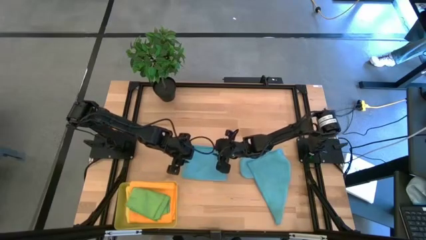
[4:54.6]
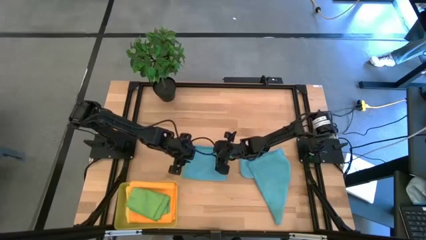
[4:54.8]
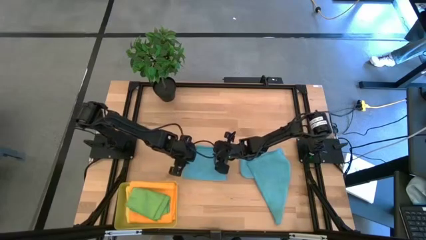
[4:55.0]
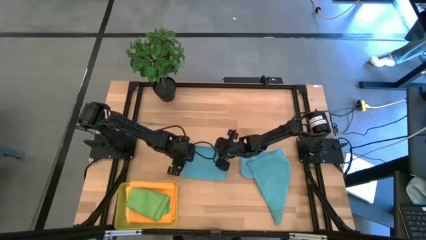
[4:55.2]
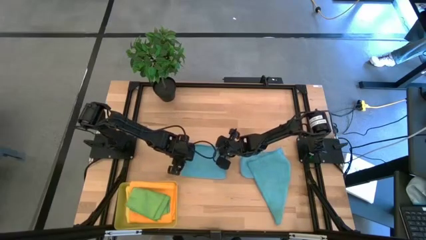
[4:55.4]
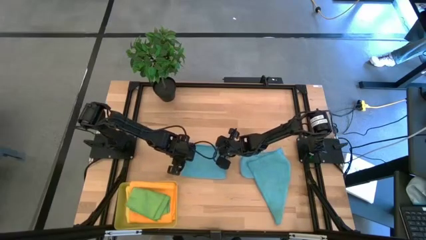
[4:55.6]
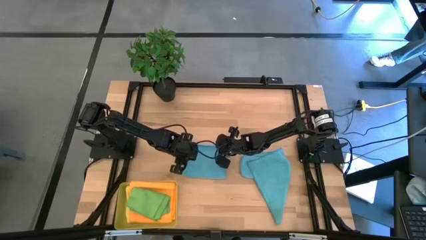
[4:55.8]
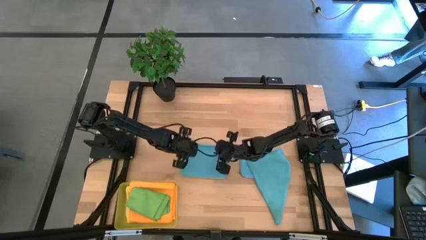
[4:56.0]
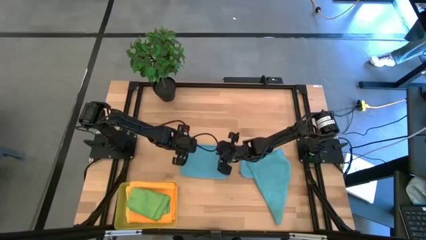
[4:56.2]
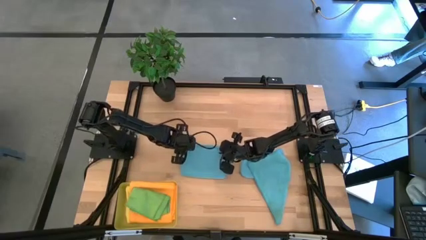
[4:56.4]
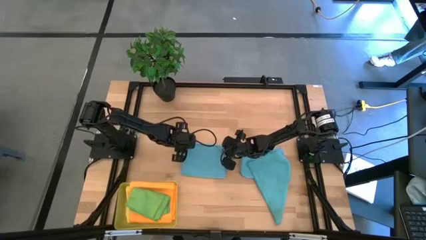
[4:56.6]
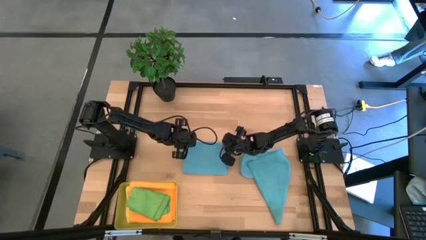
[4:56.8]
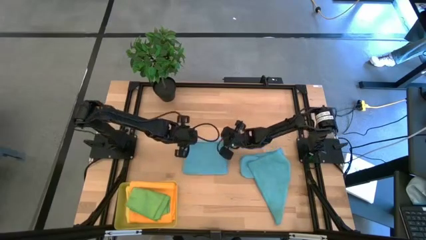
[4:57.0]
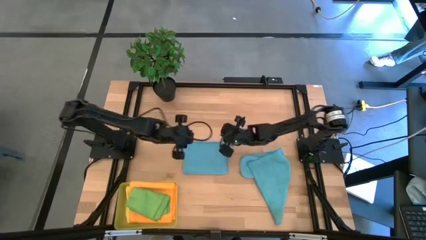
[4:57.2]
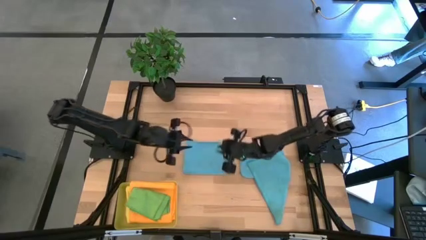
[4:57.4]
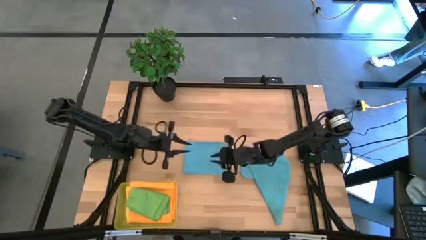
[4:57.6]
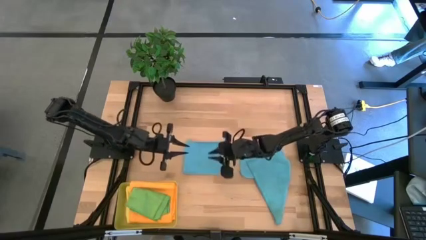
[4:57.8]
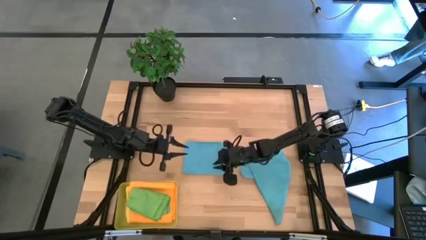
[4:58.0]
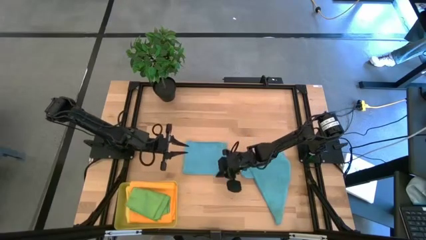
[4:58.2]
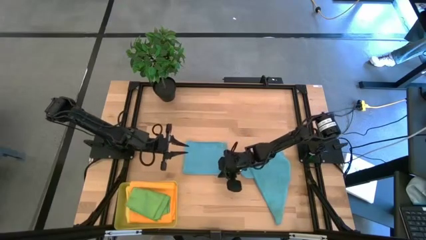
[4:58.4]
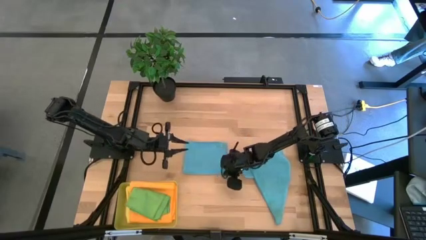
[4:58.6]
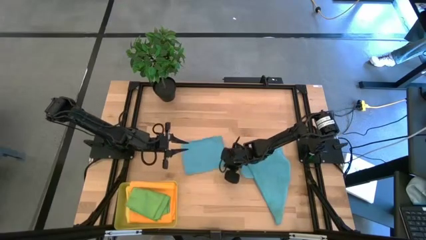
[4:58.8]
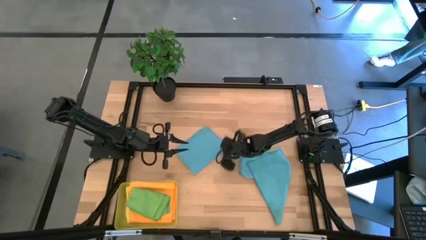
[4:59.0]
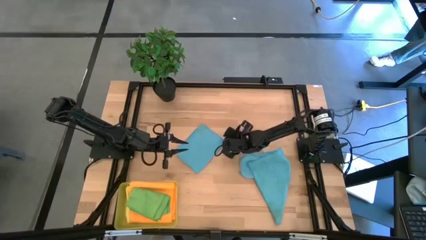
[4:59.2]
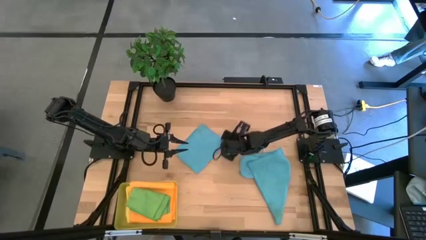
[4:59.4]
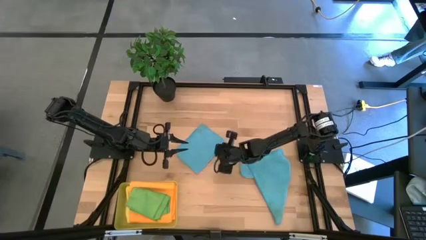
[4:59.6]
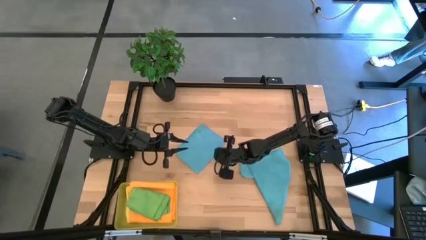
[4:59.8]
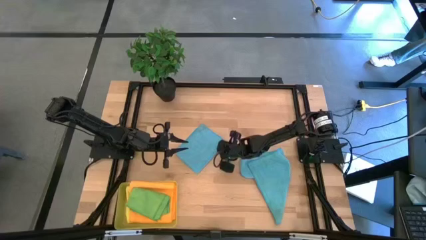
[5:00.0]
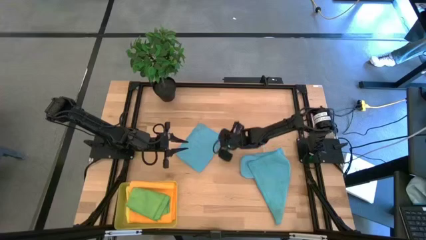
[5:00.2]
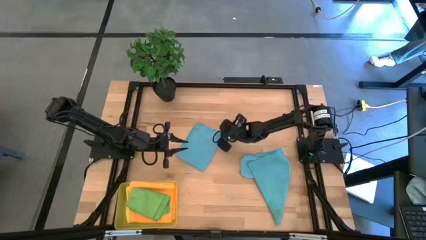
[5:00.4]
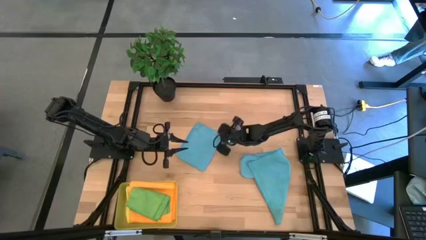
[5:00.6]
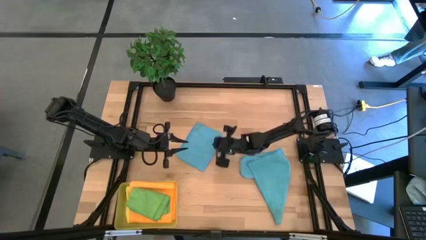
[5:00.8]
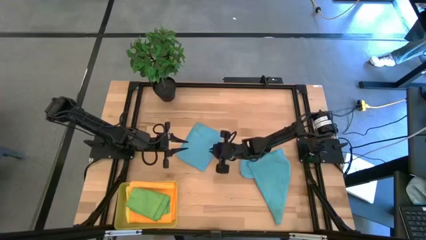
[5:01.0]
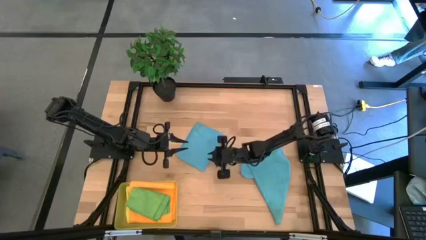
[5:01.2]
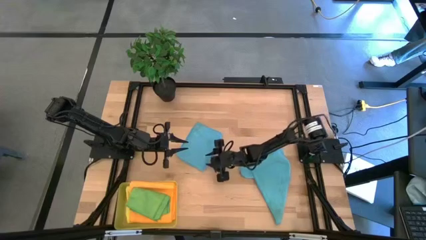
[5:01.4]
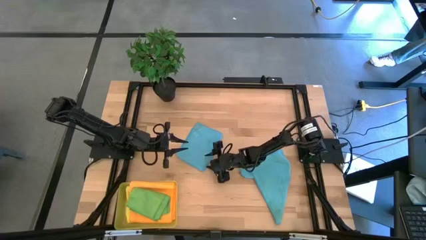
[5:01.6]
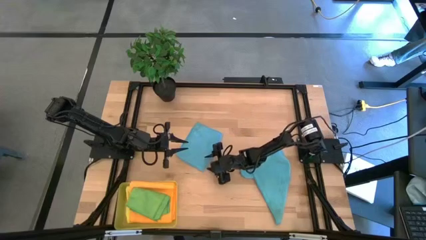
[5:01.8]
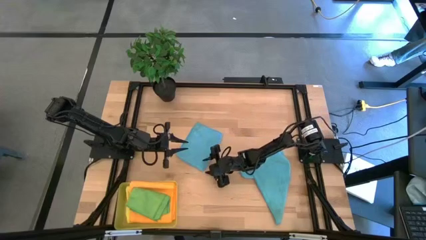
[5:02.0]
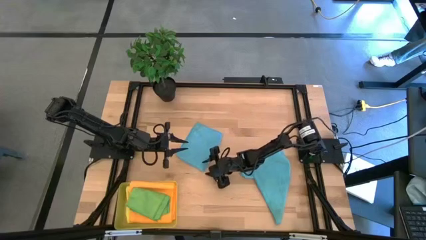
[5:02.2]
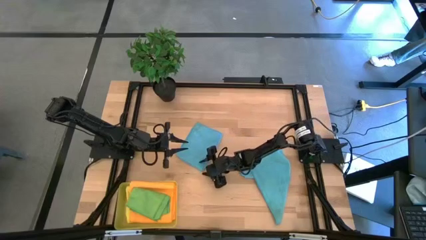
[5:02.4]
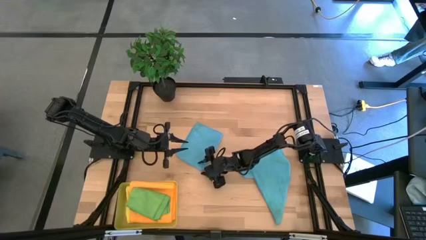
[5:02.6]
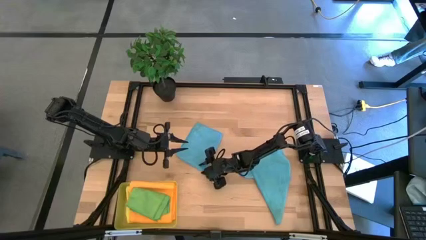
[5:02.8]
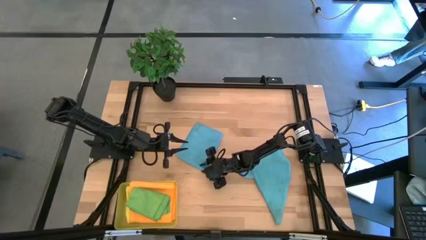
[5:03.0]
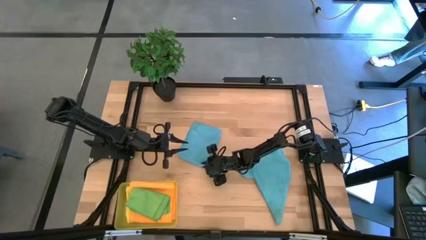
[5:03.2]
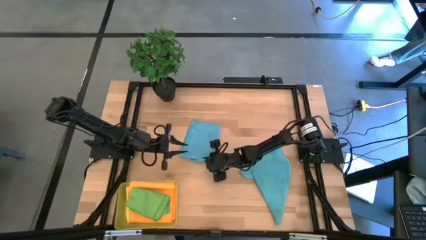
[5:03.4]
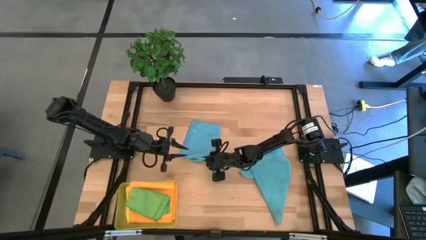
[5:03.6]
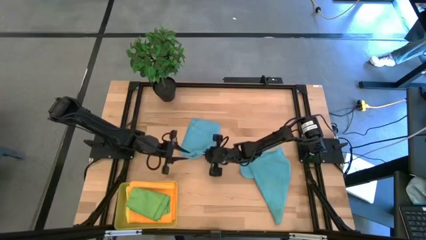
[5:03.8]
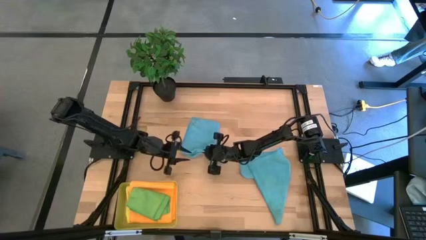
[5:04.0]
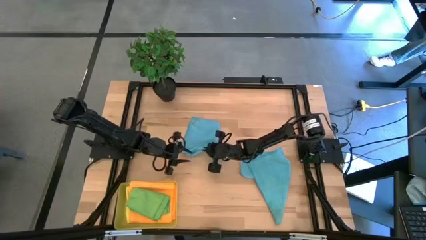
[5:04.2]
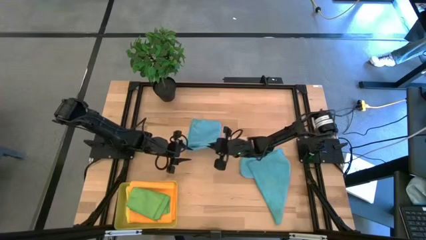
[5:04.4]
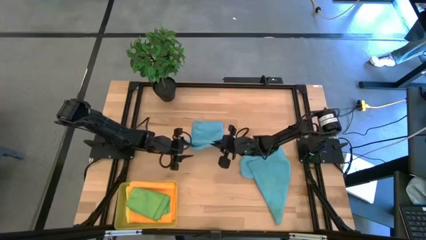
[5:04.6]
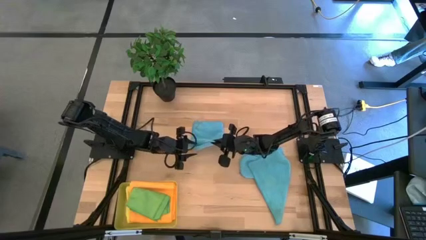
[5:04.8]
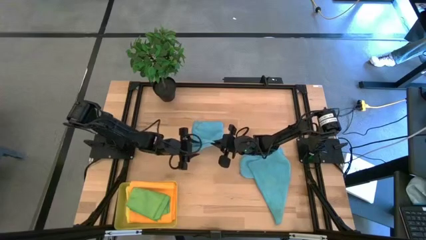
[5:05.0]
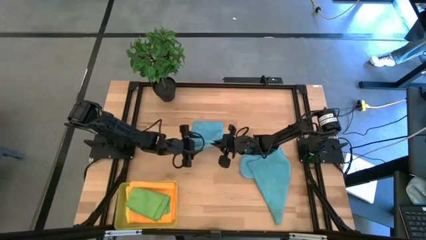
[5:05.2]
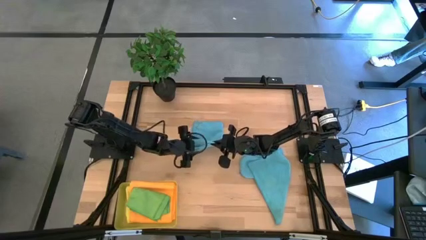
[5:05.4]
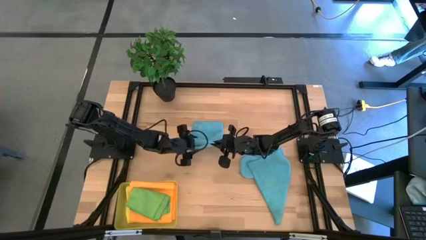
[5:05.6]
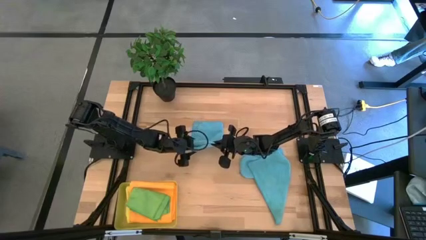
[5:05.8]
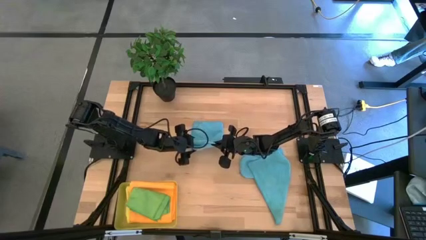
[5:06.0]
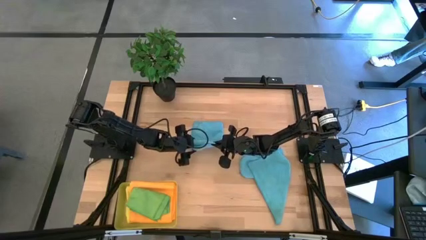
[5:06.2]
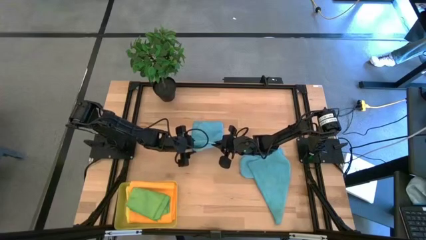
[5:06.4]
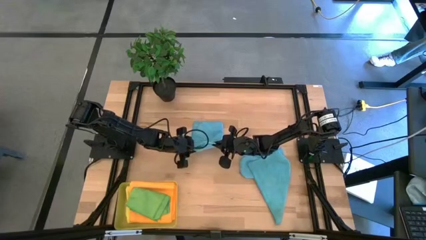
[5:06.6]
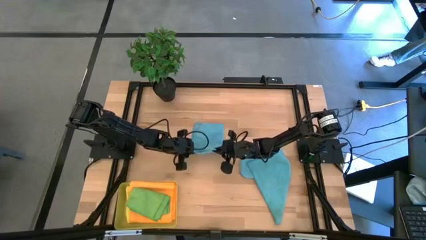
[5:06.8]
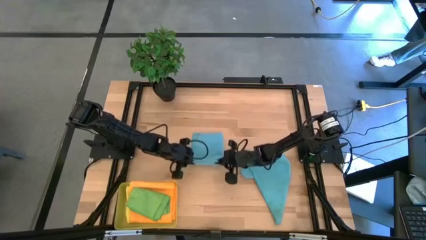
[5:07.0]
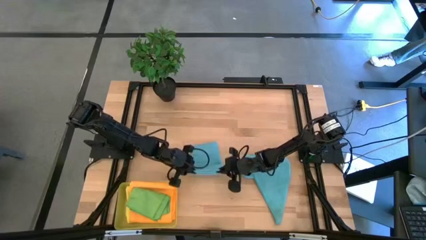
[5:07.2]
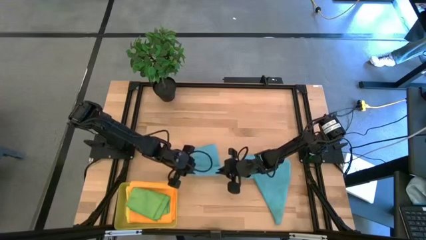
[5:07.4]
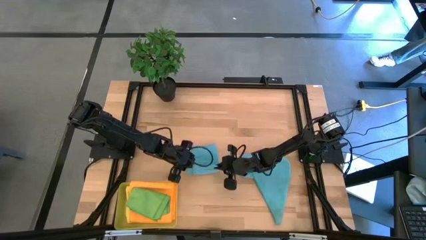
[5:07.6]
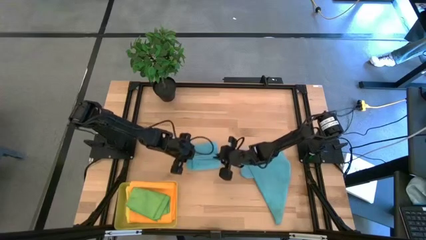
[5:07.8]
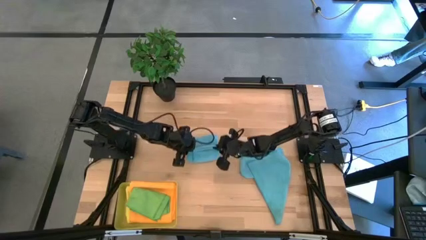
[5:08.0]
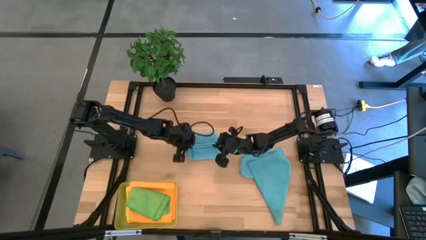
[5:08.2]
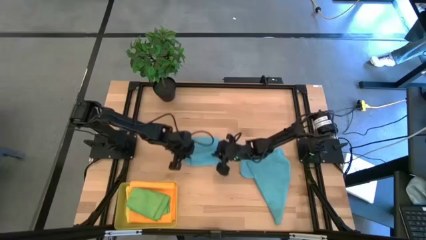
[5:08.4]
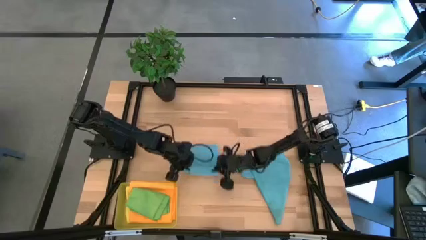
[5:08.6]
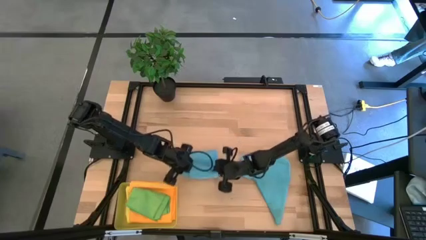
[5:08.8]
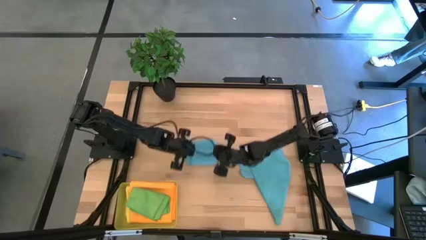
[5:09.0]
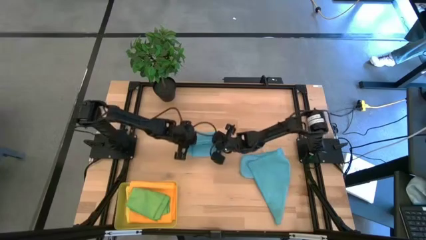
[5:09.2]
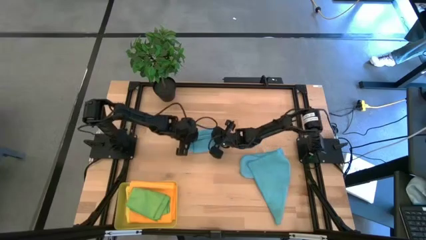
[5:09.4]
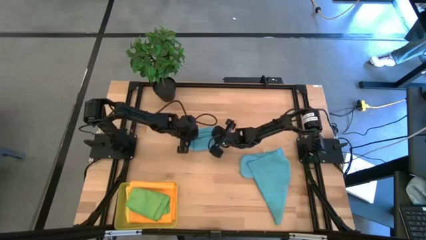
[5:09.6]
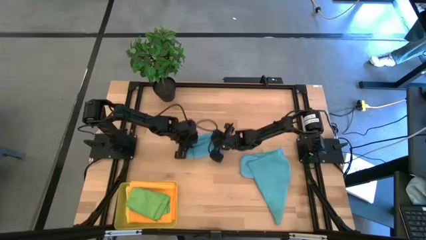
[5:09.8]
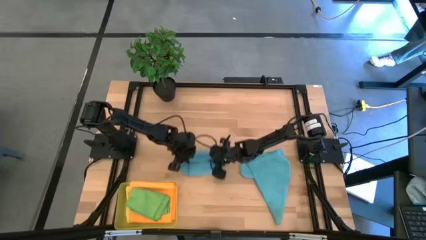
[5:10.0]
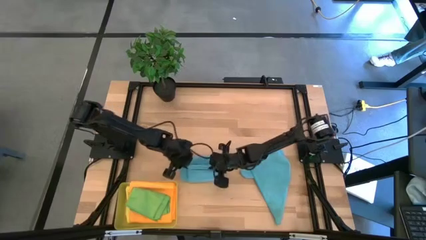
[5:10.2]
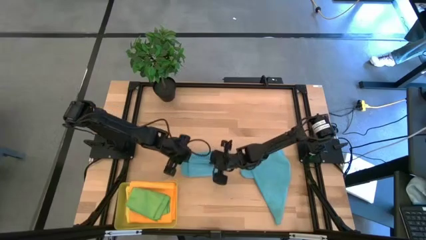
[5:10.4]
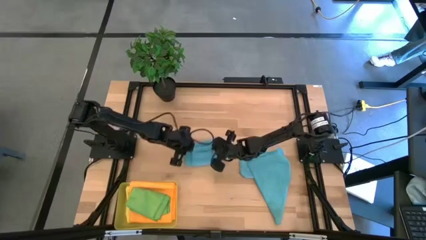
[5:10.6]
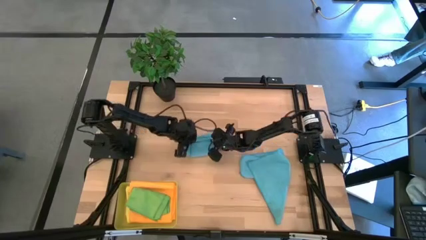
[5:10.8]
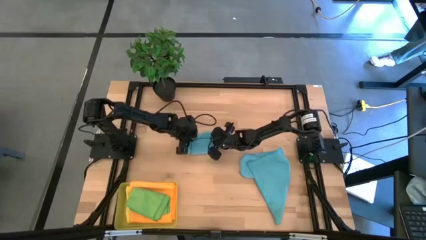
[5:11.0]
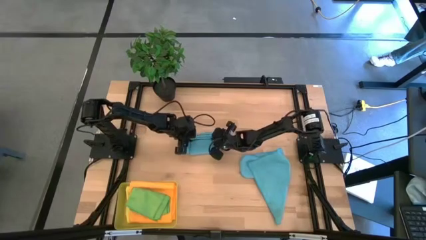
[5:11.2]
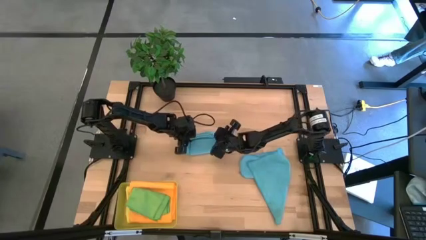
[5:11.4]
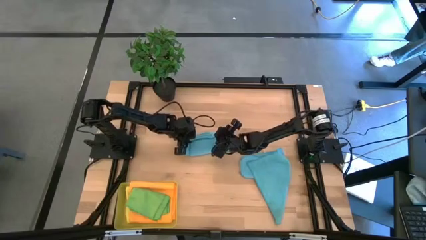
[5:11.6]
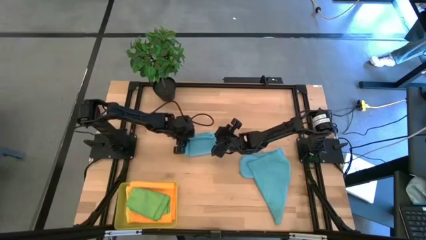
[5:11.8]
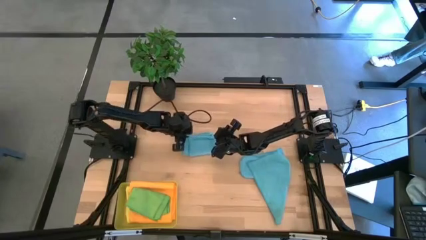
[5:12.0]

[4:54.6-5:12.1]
Task: Fold microfiber towels
Fold the top blue microfiber cloth
